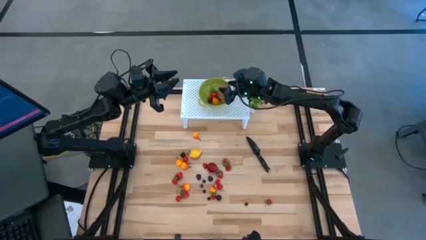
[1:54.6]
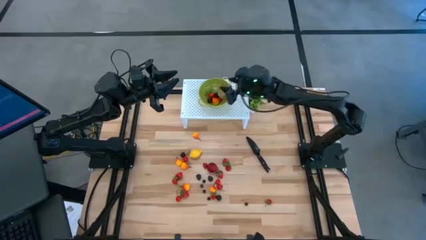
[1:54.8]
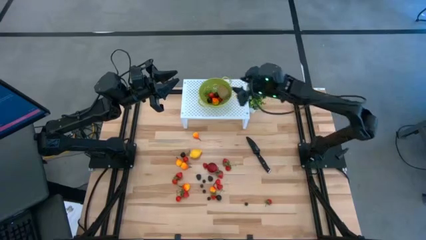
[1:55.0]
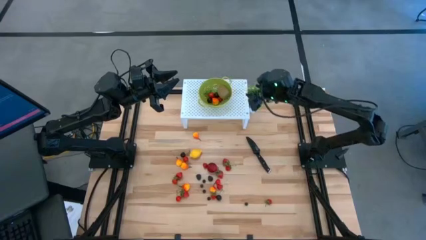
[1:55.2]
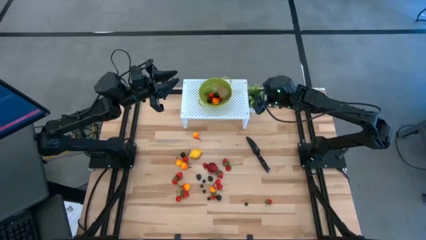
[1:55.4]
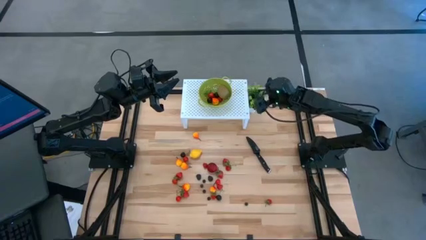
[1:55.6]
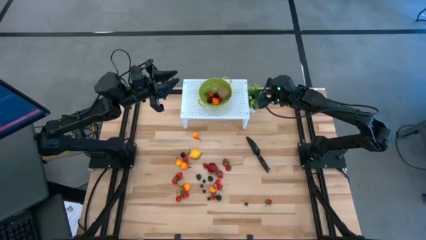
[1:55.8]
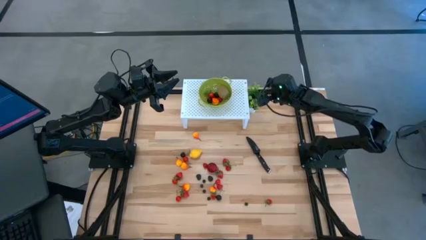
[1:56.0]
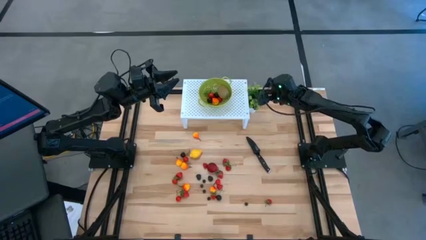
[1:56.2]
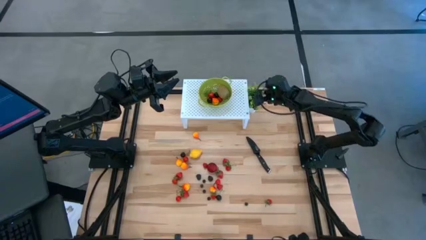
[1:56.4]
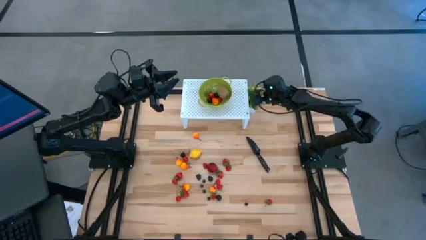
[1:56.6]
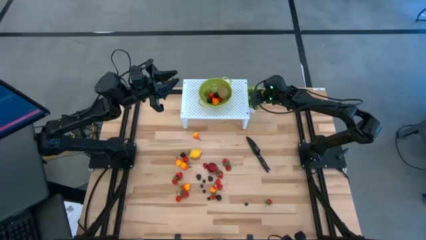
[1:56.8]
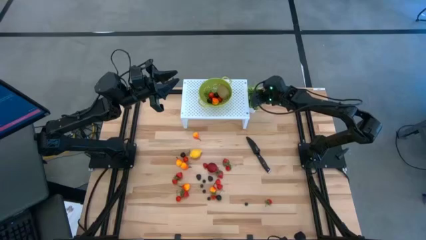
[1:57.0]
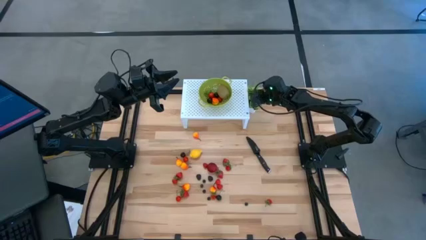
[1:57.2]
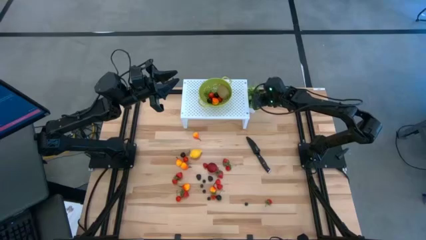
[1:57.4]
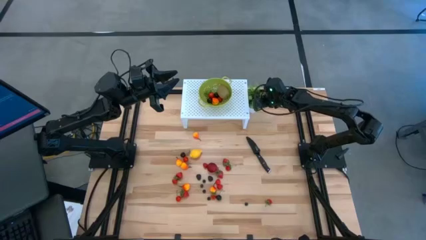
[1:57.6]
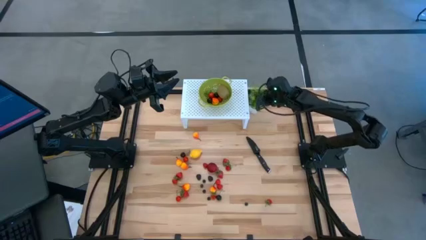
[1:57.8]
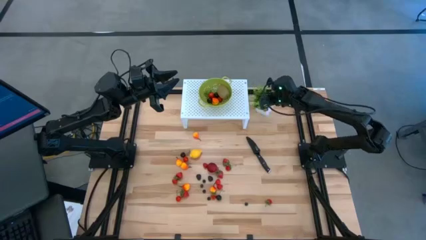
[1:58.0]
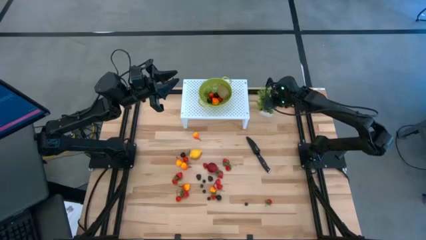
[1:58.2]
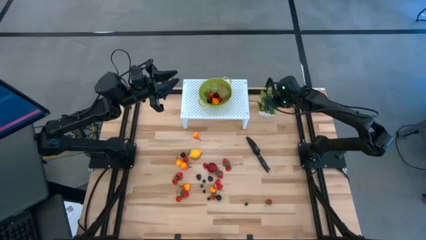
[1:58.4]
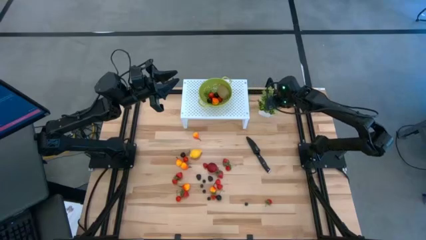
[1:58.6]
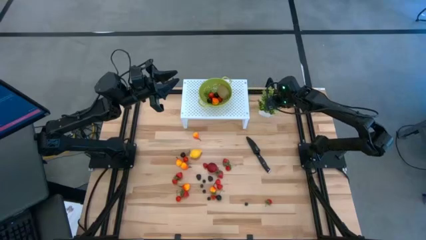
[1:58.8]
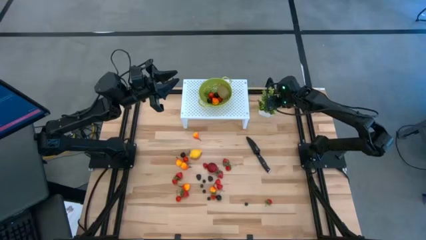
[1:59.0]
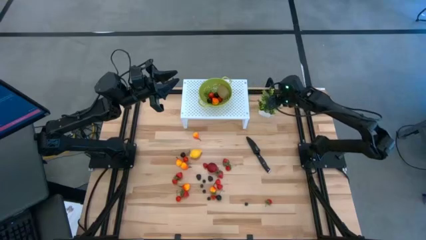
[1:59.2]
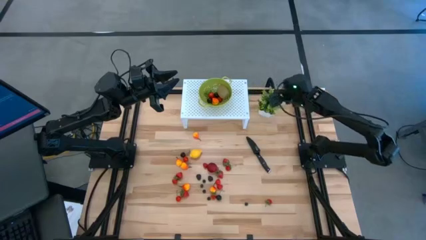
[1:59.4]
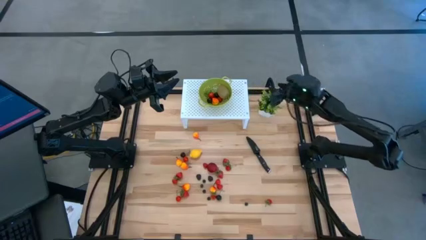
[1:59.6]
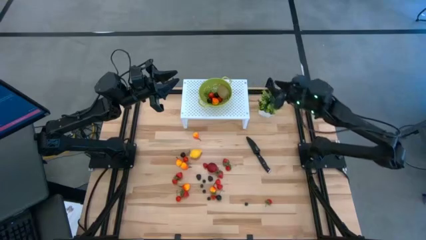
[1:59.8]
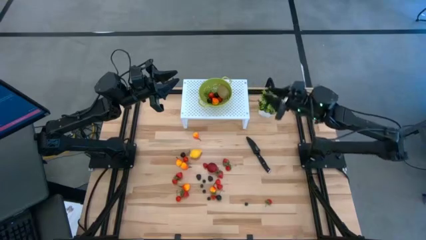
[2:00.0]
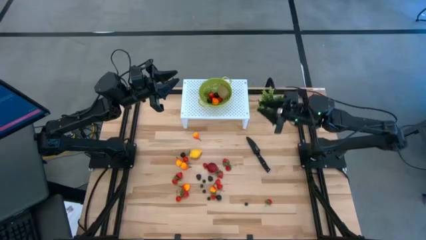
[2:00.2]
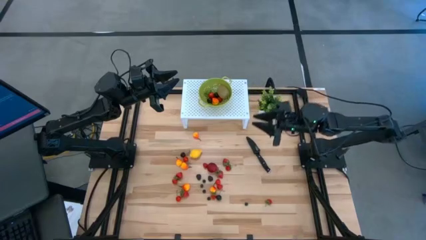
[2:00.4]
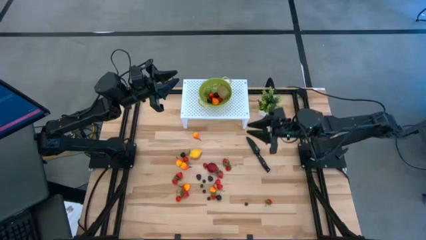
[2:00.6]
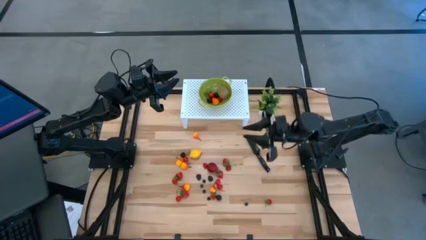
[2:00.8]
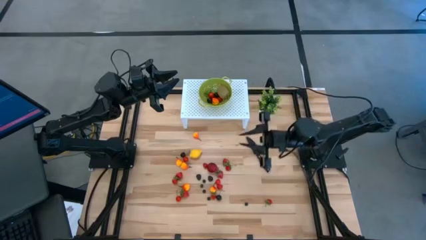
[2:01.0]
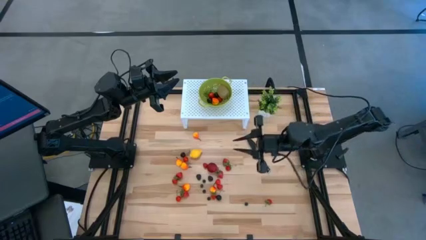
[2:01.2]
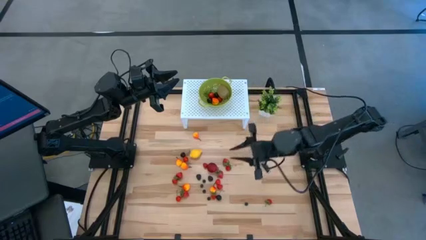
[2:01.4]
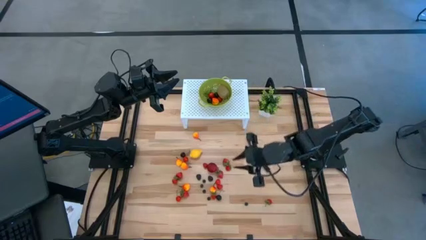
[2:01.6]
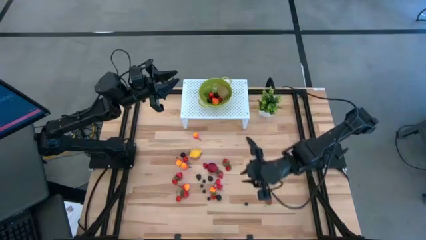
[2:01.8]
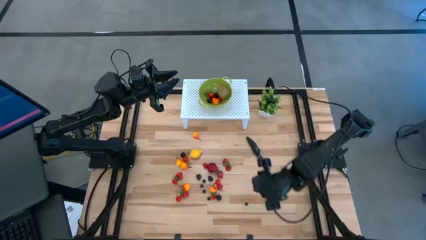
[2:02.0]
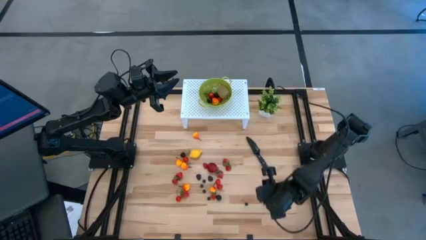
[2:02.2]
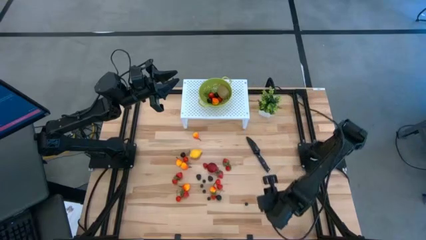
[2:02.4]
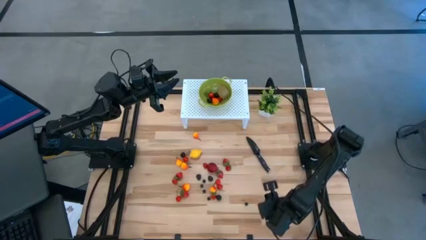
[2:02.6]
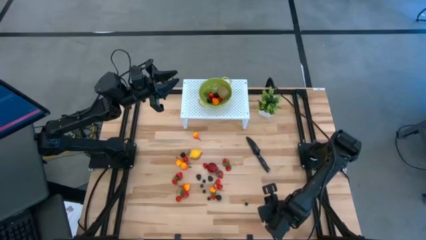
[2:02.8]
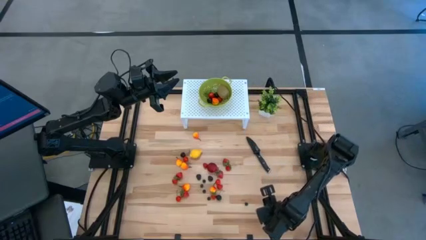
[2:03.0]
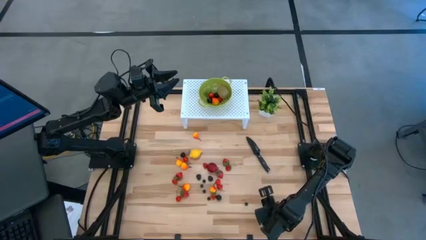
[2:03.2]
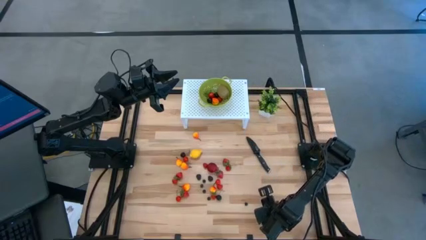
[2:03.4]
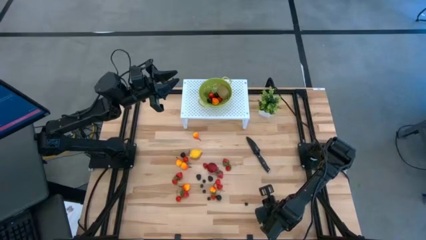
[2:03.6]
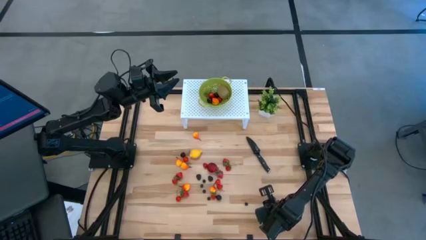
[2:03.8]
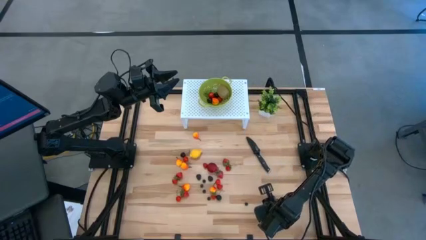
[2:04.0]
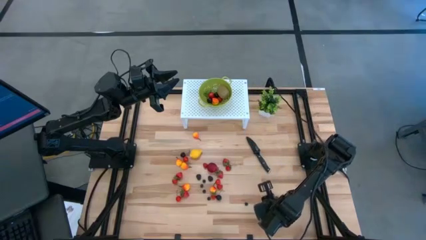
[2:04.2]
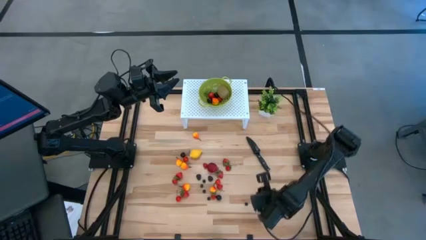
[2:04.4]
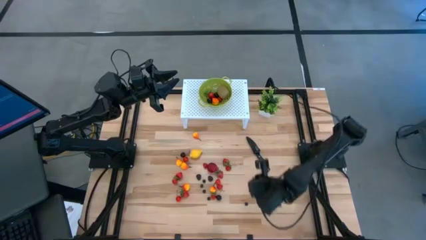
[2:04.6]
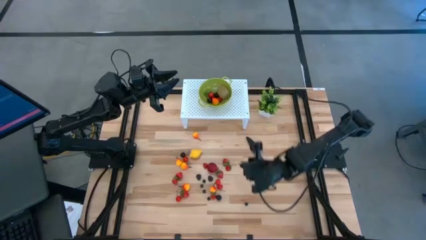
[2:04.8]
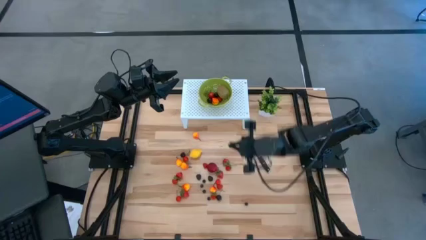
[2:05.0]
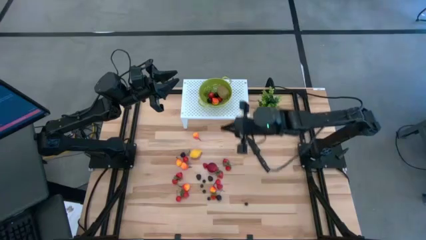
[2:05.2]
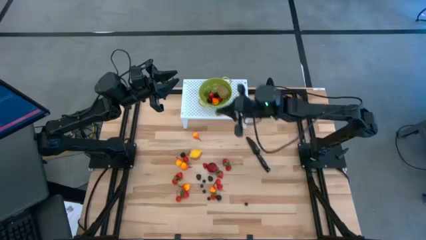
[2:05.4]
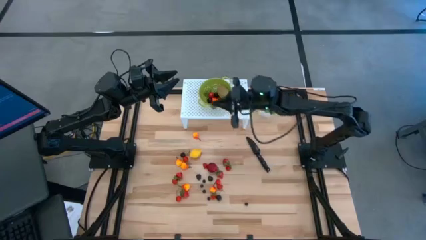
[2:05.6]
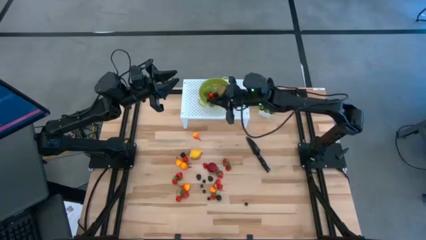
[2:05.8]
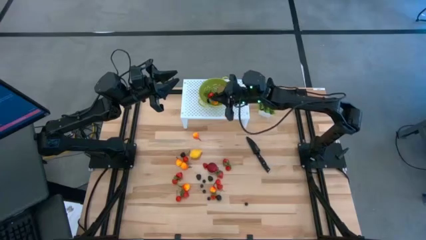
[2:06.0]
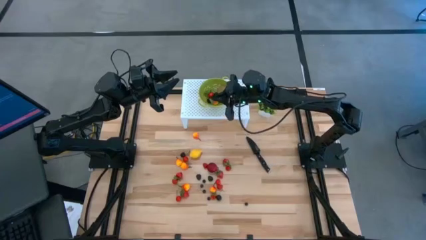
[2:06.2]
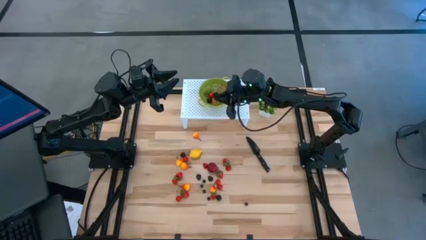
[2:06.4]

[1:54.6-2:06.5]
Task: Pick & Place Fruit
Put the red strawberry into the green strainer bowl

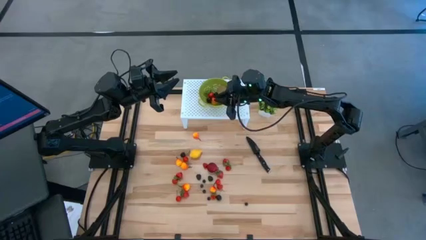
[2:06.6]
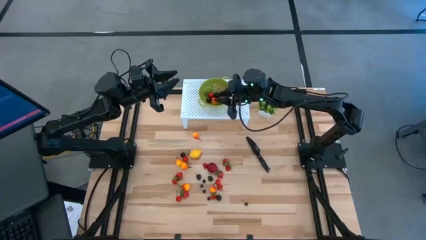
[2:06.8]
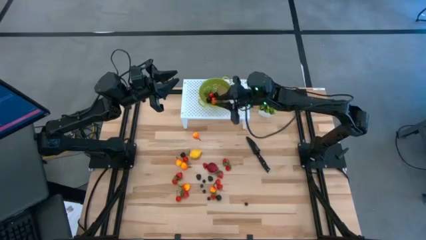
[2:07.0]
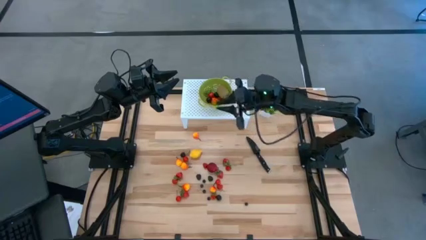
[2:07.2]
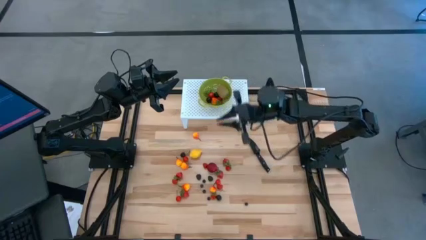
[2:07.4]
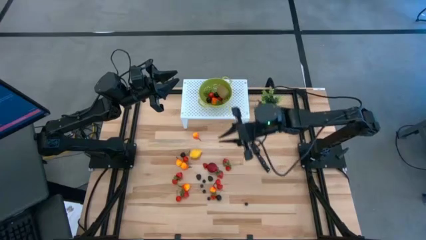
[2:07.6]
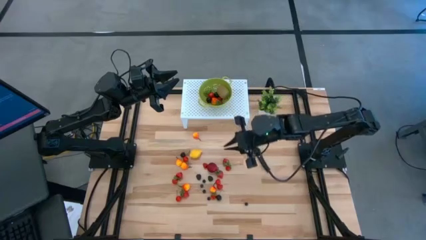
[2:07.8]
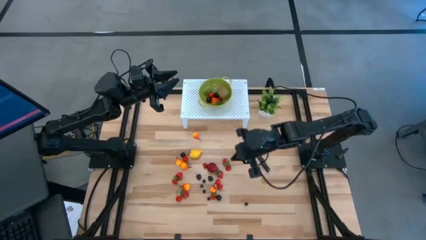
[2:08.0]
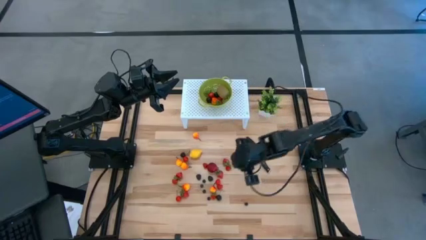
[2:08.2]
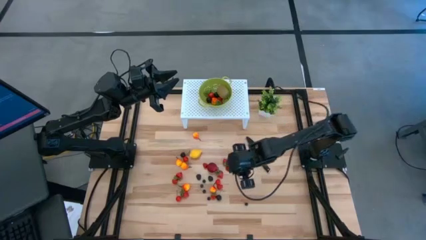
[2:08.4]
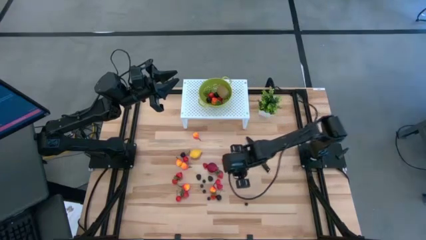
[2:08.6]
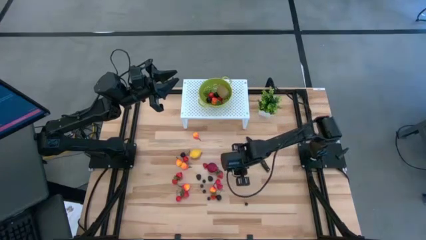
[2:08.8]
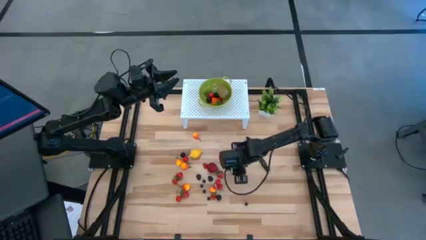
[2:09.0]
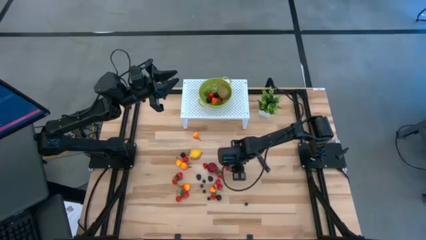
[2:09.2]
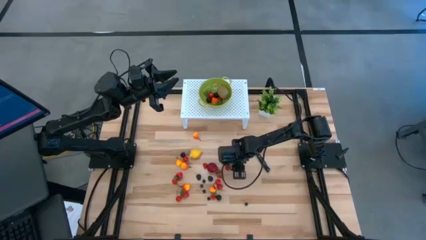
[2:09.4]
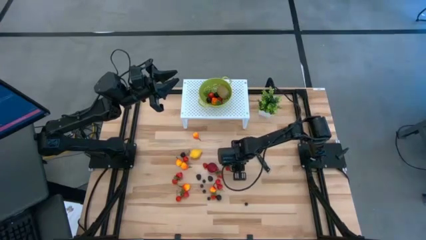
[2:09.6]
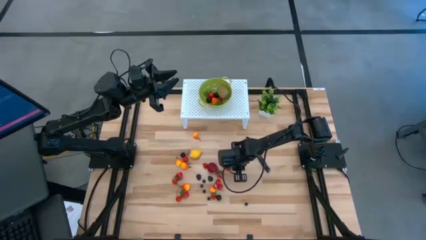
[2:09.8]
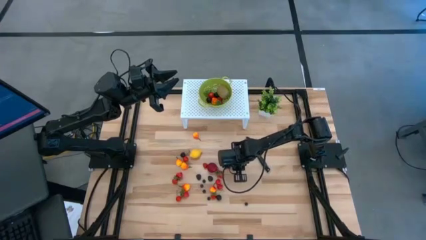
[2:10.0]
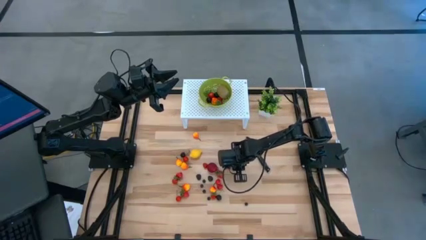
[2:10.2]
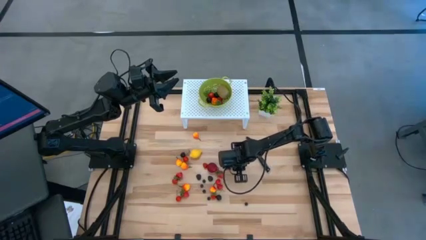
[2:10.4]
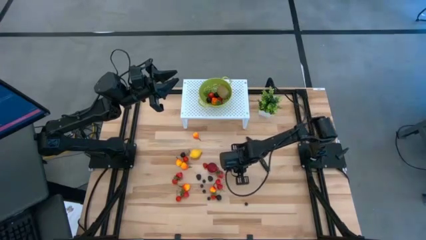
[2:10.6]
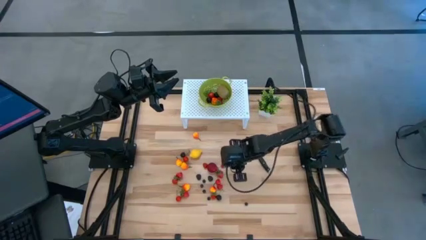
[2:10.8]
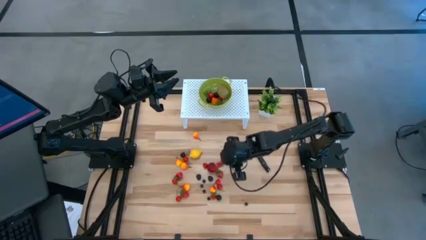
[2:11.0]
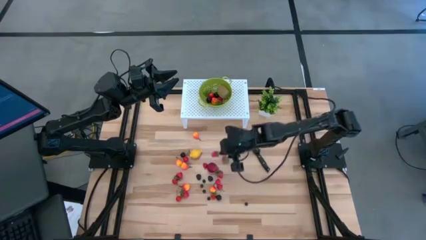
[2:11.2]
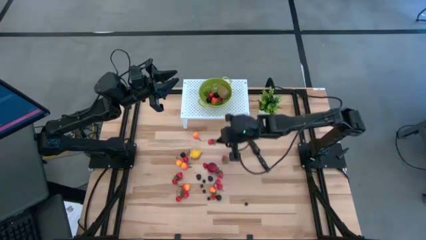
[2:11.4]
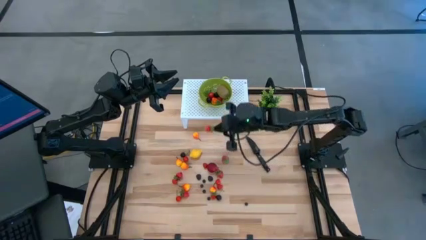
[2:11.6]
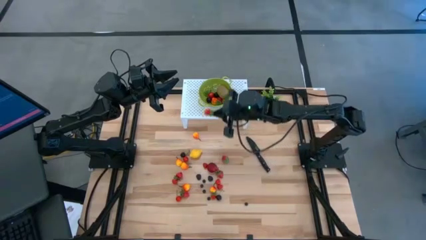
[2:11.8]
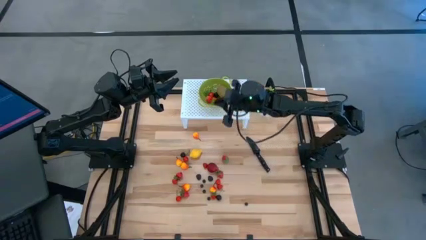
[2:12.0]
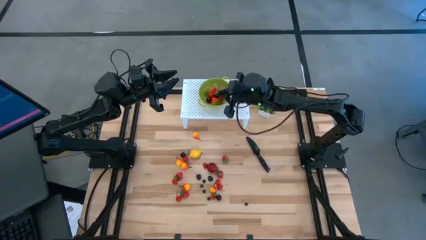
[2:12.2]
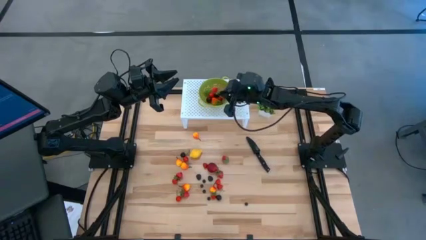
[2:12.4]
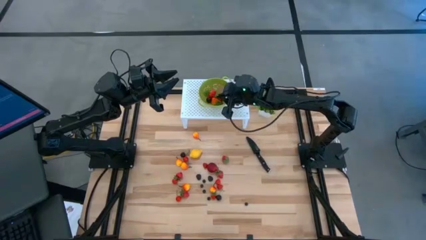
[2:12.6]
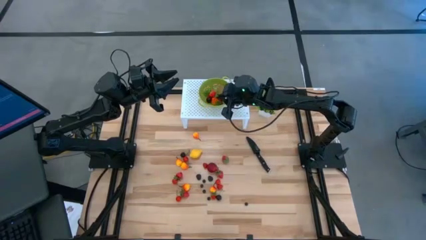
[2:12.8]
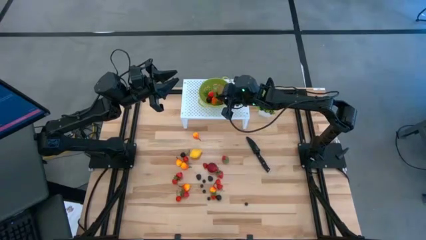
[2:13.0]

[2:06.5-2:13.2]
Put the red strawberry into the green strainer bowl
